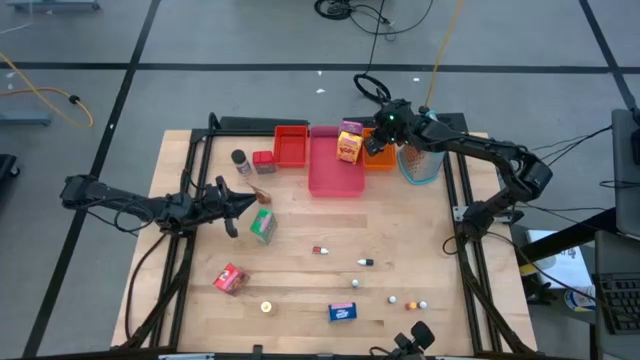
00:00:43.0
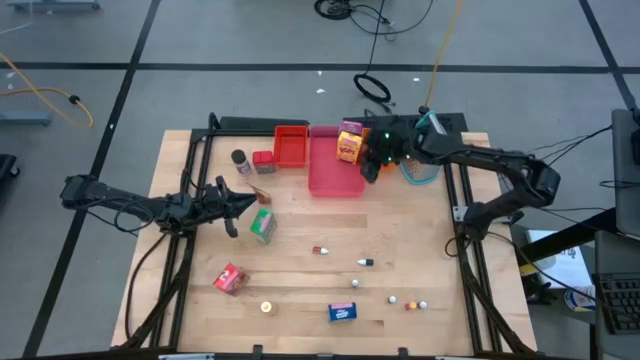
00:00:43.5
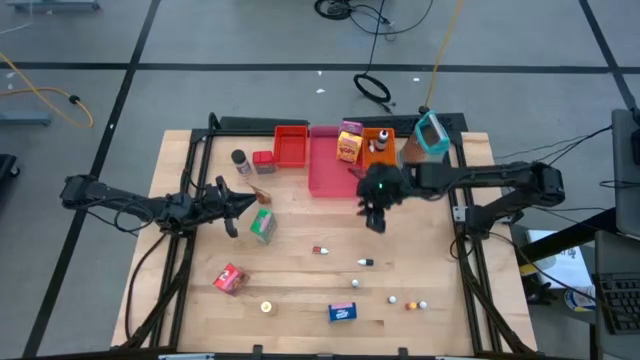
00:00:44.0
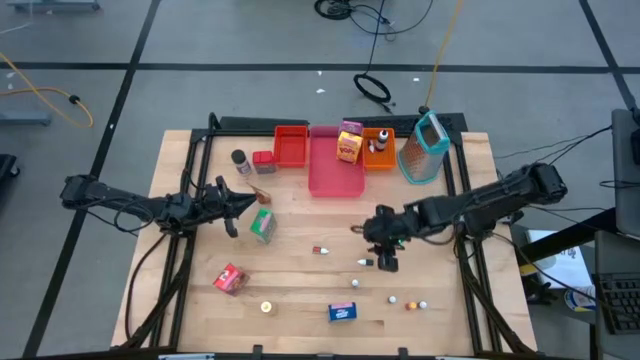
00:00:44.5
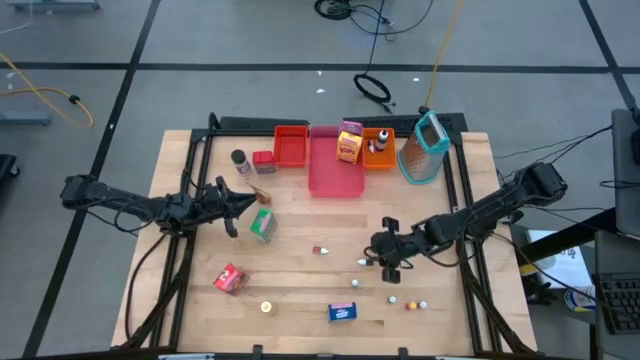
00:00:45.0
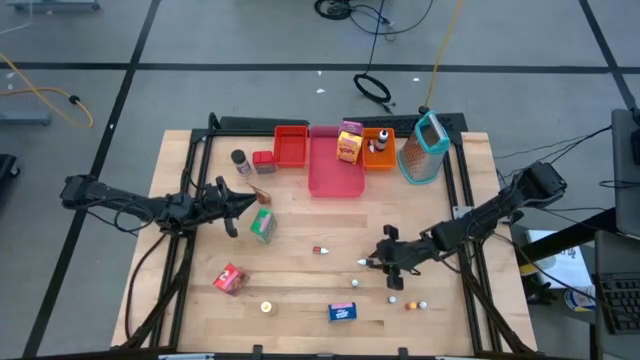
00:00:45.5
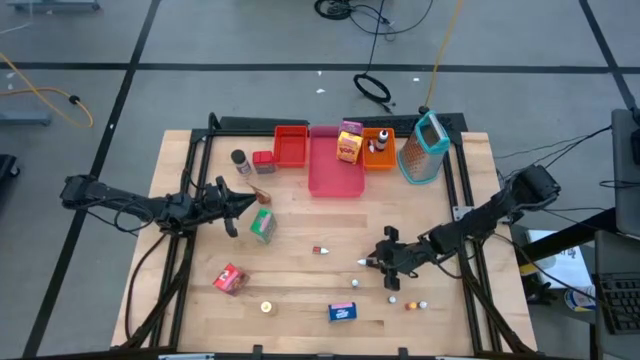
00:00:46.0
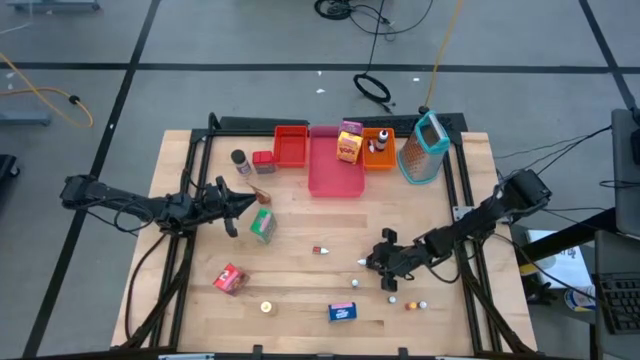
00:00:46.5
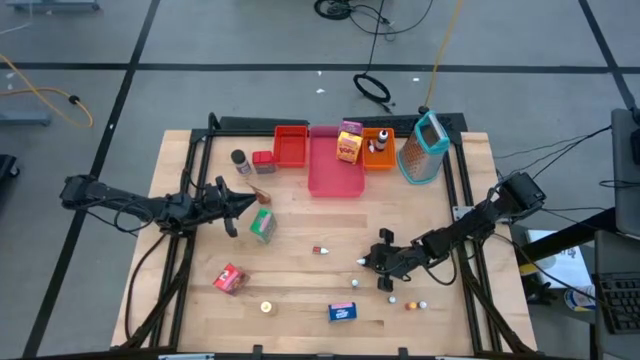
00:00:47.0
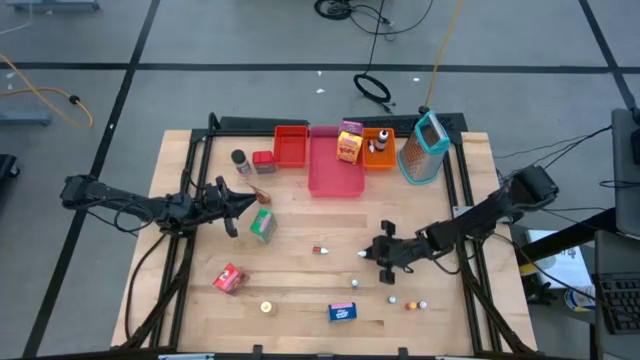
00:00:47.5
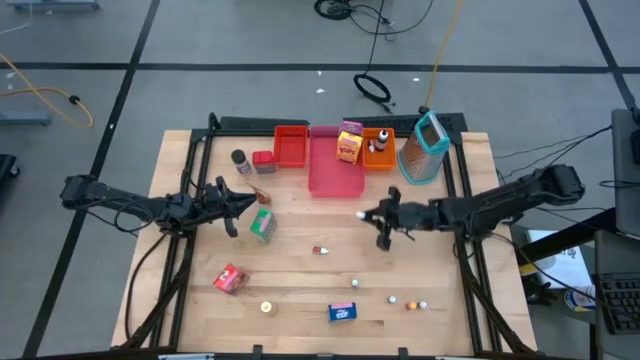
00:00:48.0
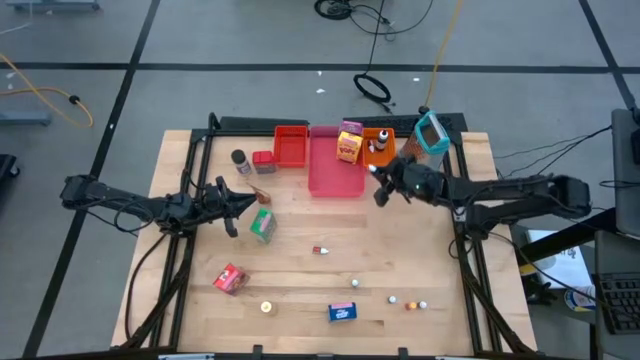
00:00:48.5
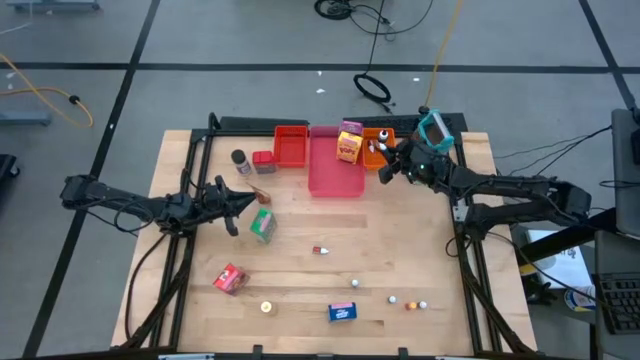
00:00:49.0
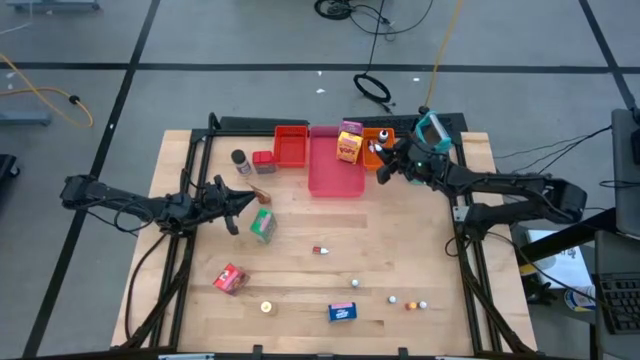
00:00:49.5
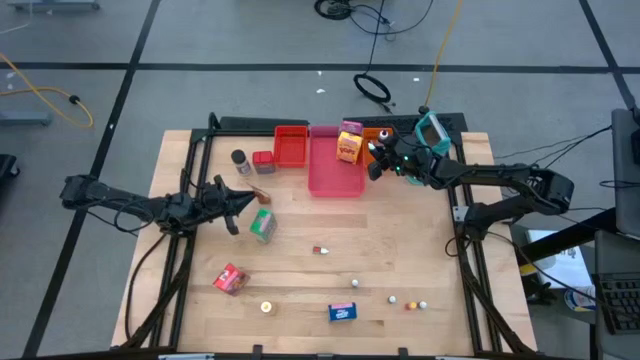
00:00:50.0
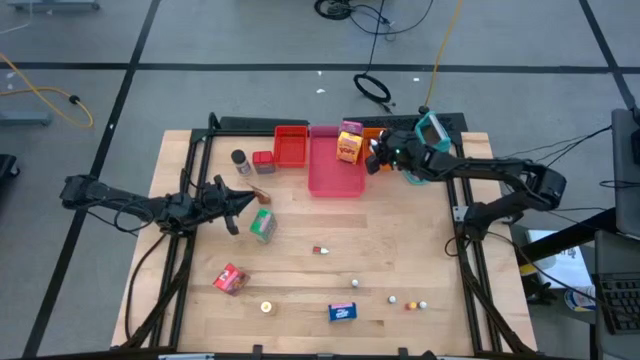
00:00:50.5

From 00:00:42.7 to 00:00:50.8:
Task: Pick & Place Kitchen Items
Put the black food coloring bottle into the orange bin

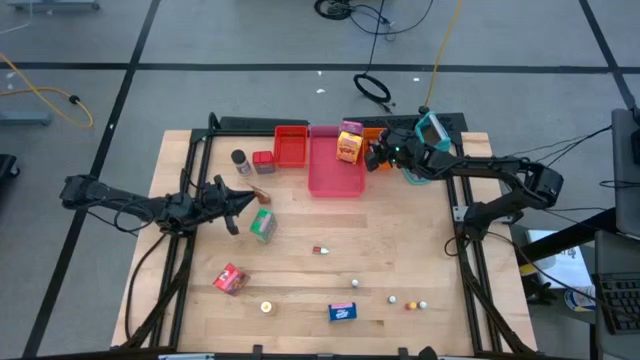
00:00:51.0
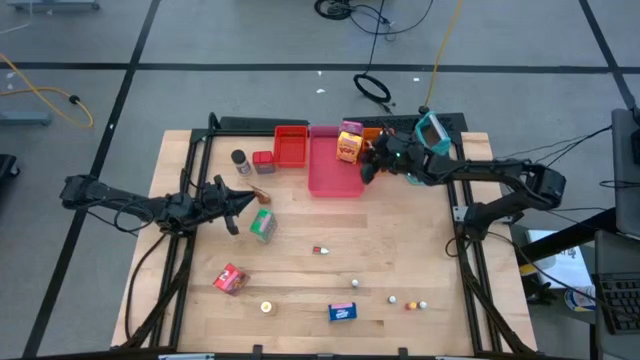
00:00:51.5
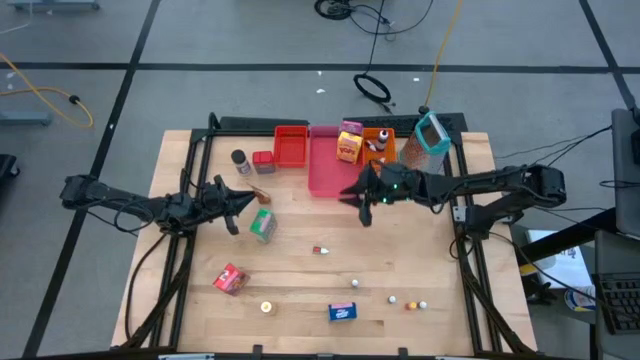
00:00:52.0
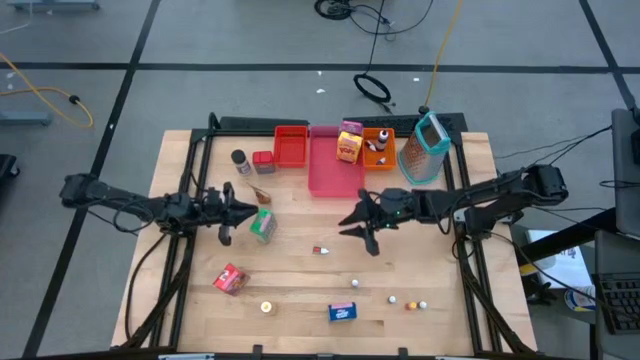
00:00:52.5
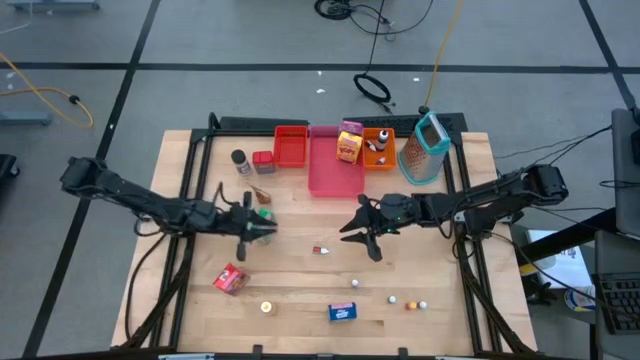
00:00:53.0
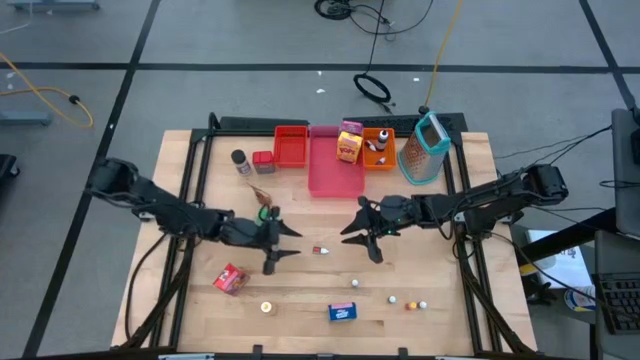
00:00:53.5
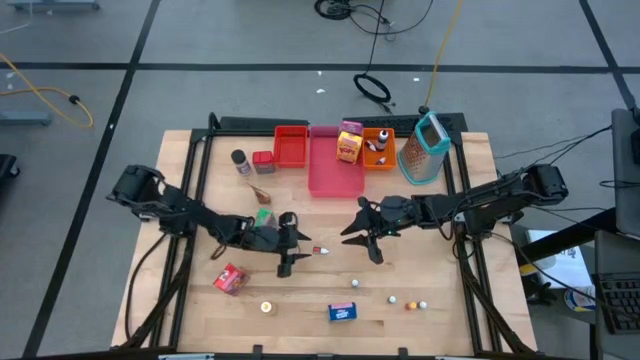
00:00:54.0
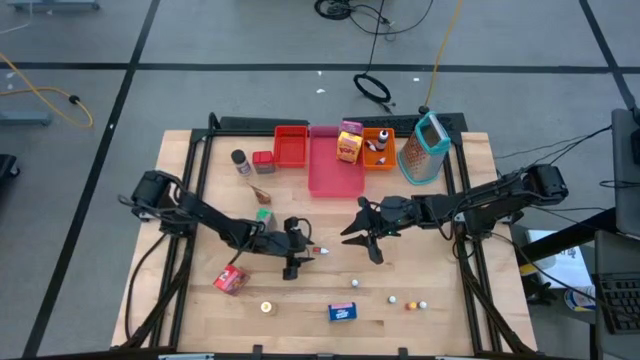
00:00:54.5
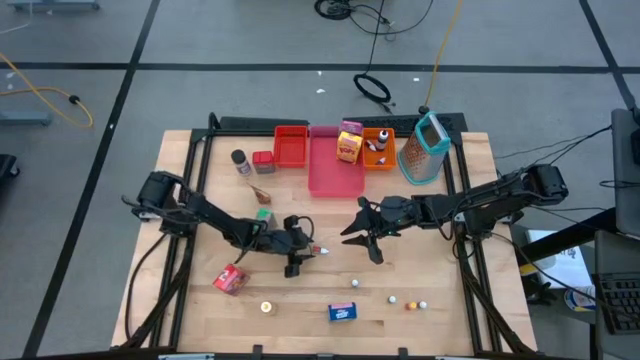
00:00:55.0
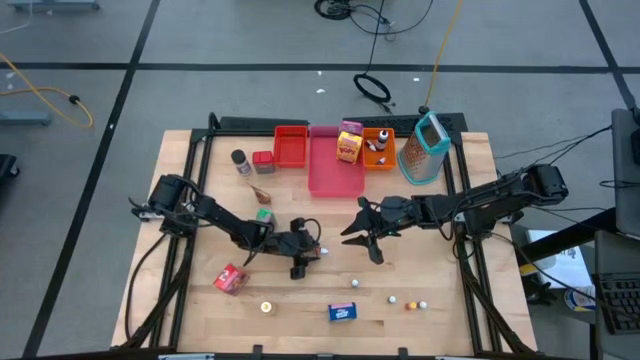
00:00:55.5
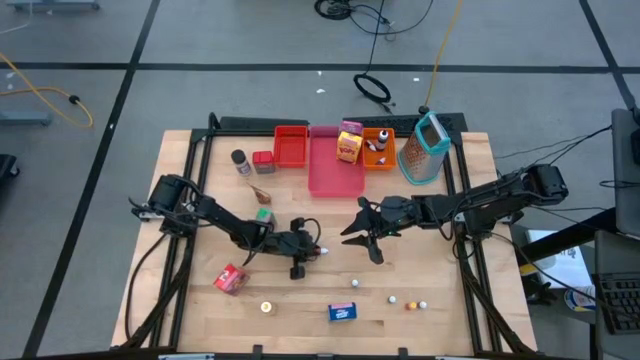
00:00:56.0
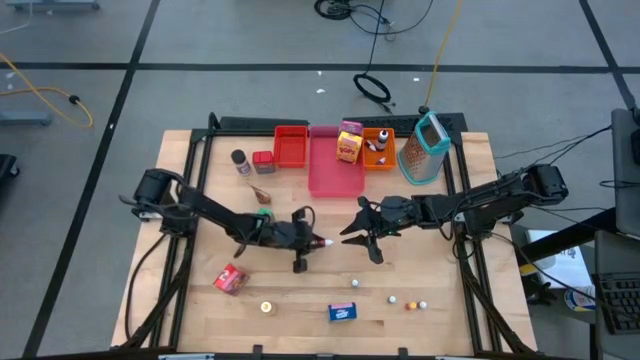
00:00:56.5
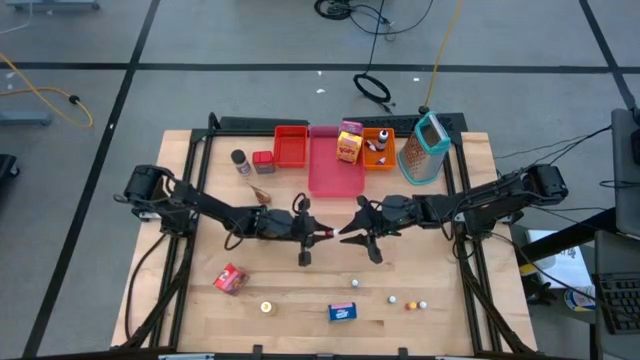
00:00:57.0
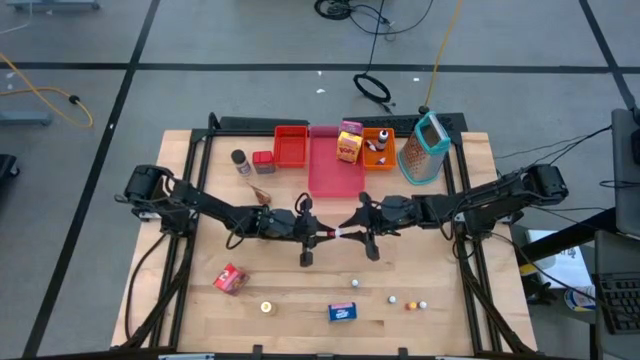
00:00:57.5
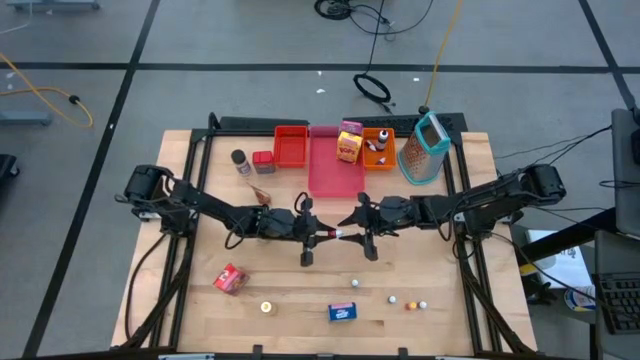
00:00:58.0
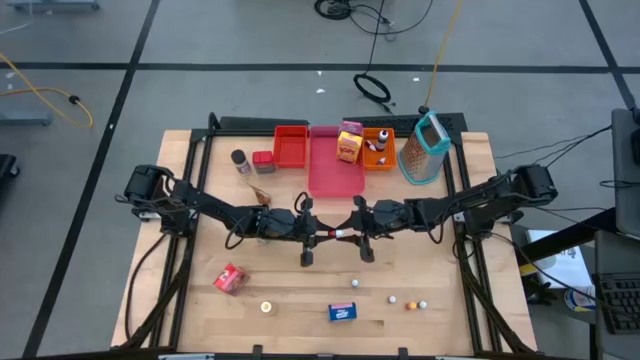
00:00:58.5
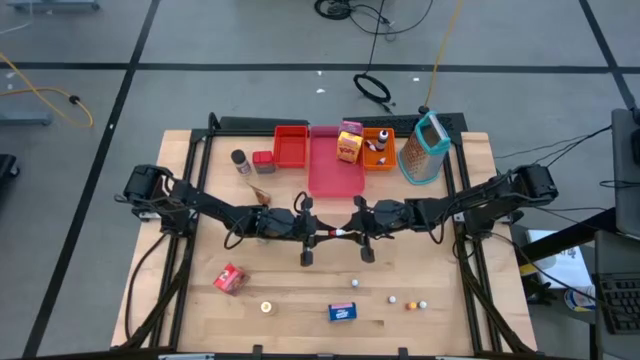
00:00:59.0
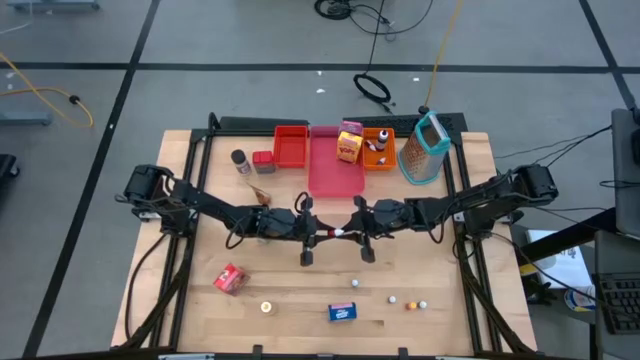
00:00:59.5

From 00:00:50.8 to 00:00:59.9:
Put the red food coloring bottle into the orange bin

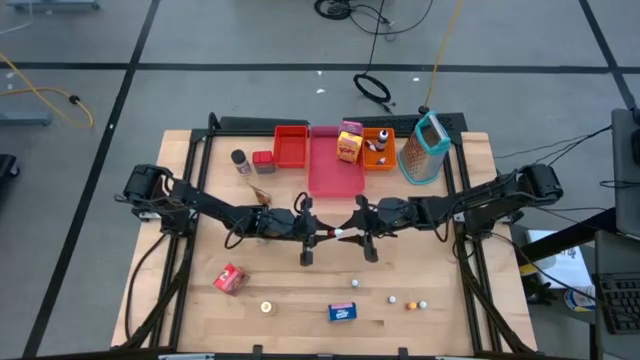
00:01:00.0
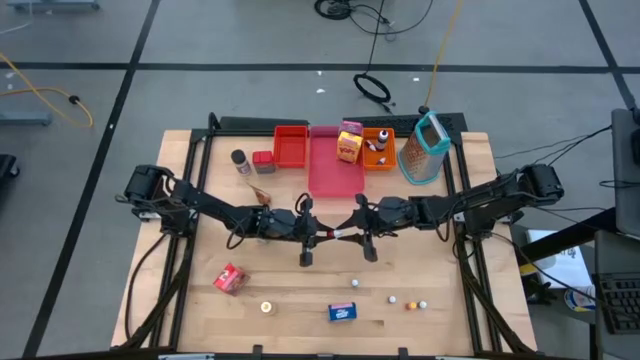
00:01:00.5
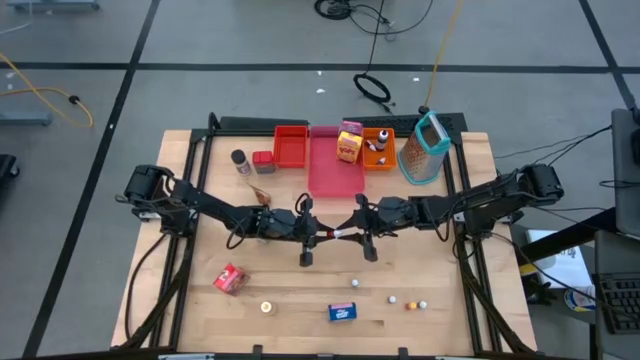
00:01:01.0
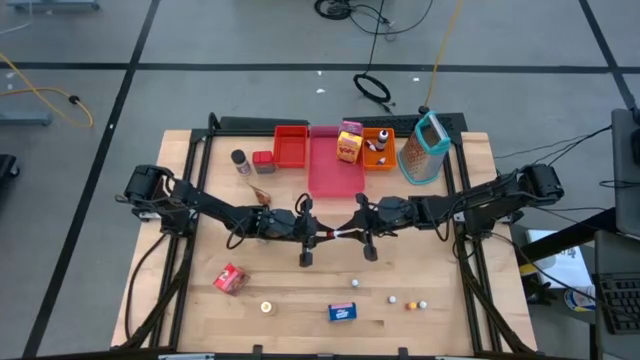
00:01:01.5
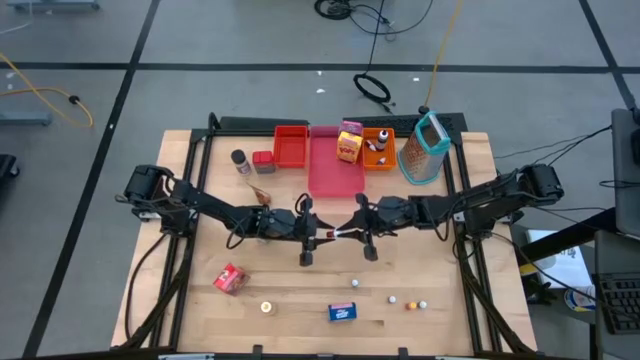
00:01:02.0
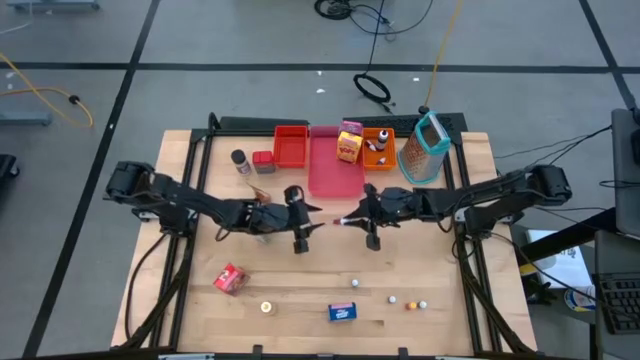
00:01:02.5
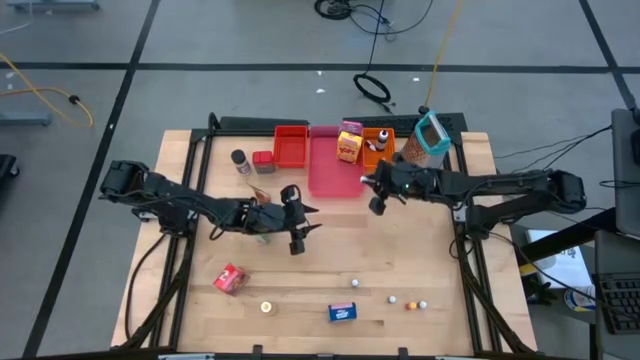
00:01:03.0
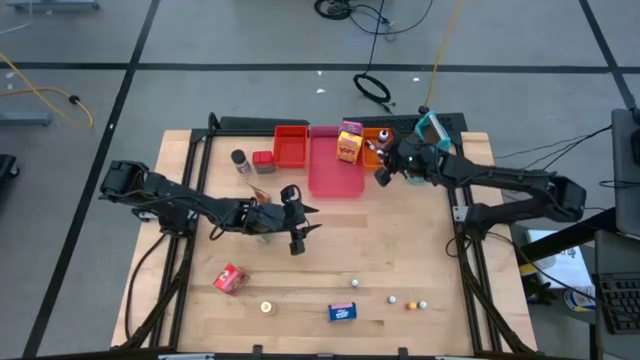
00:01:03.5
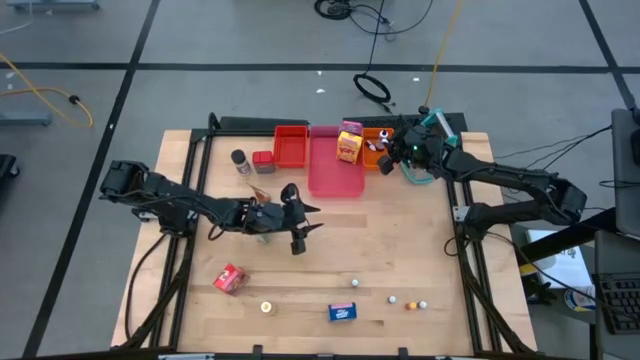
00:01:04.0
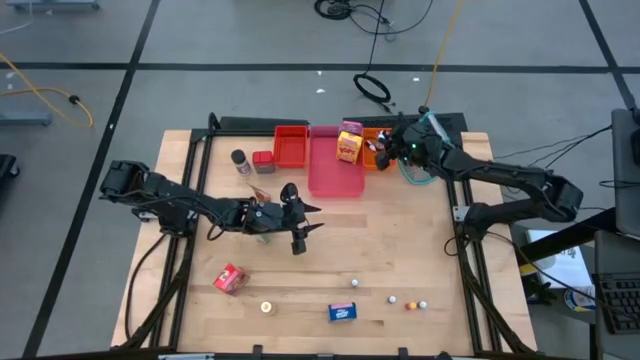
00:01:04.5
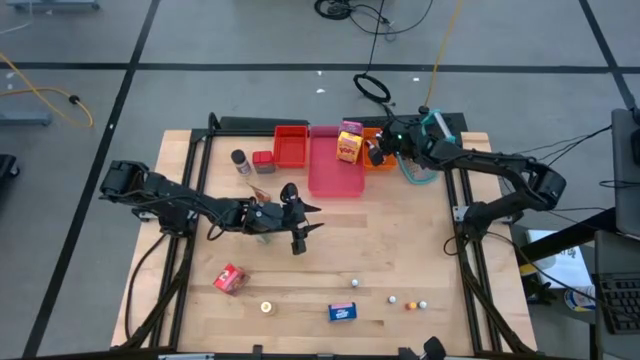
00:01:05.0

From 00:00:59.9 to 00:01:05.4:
Put the red food coloring bottle into the orange bin
